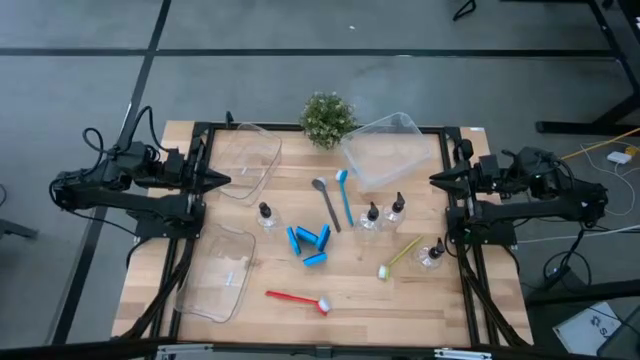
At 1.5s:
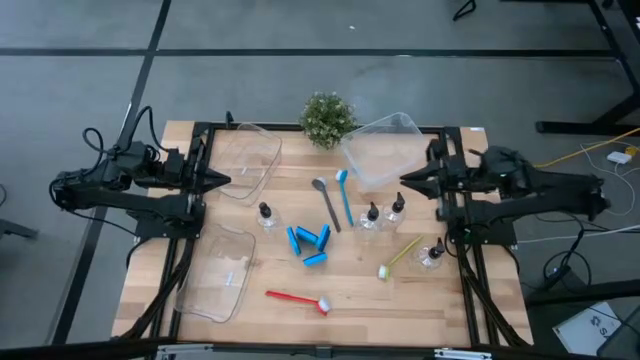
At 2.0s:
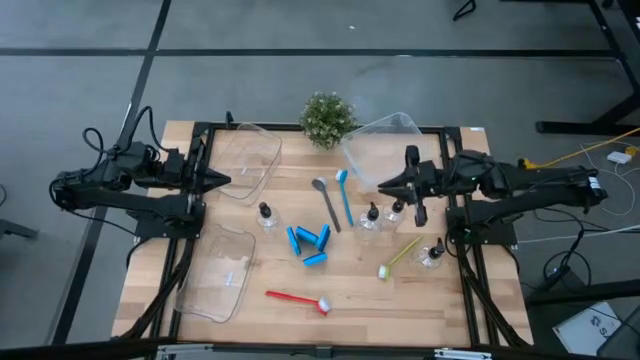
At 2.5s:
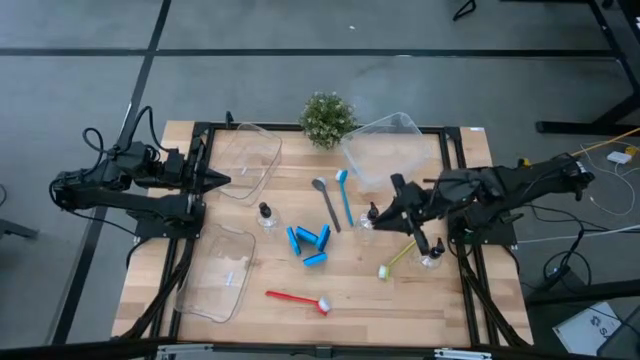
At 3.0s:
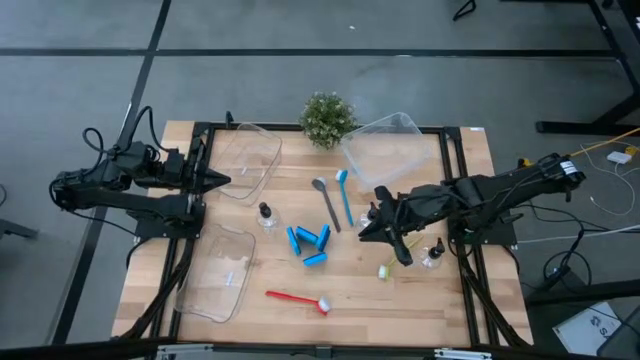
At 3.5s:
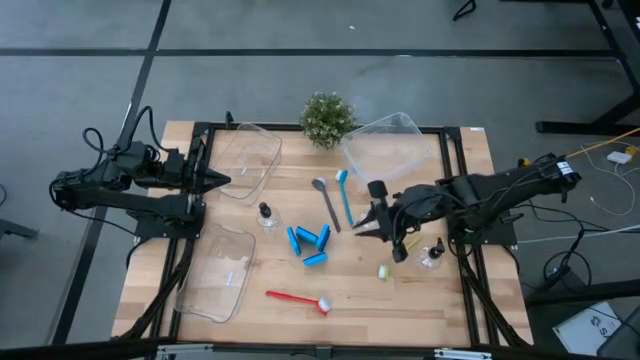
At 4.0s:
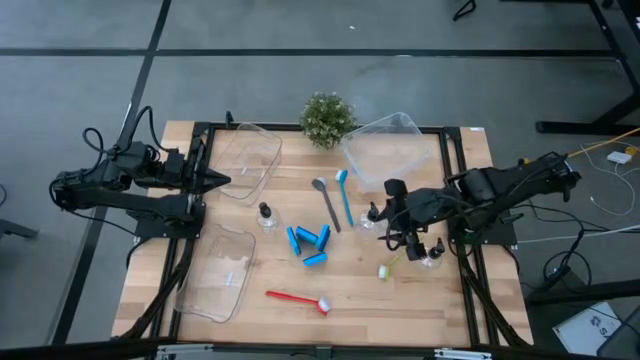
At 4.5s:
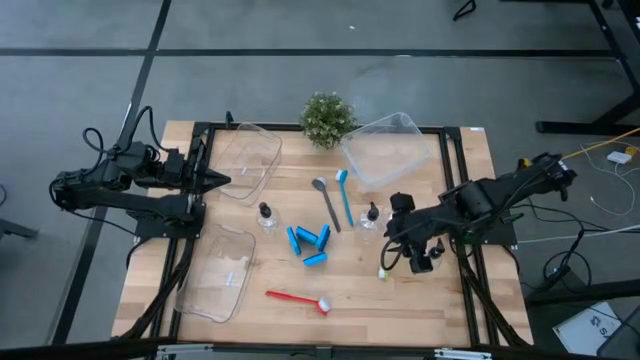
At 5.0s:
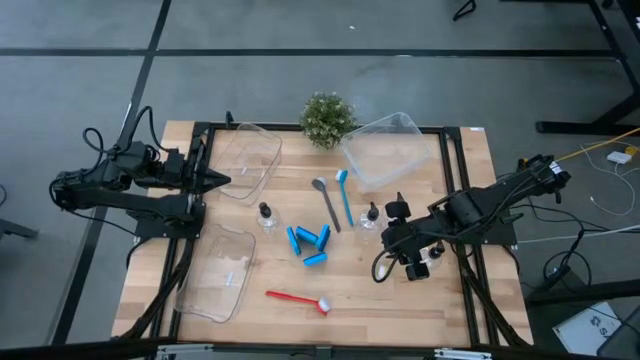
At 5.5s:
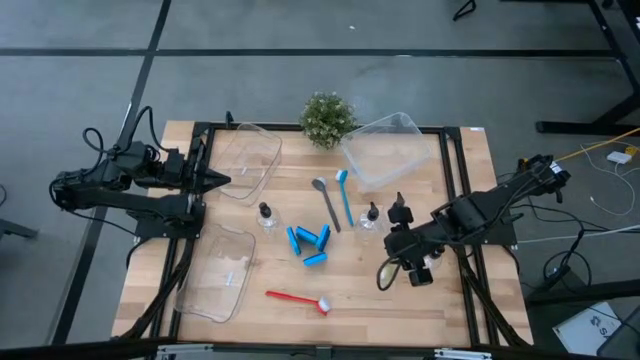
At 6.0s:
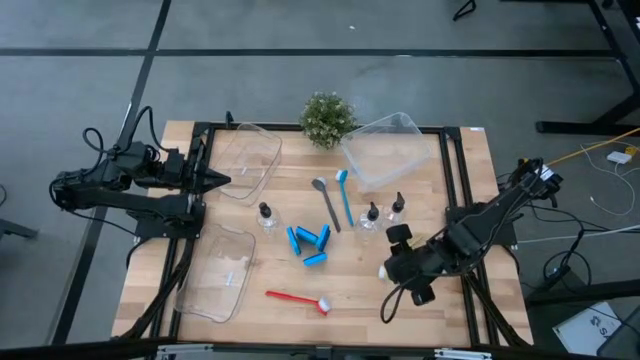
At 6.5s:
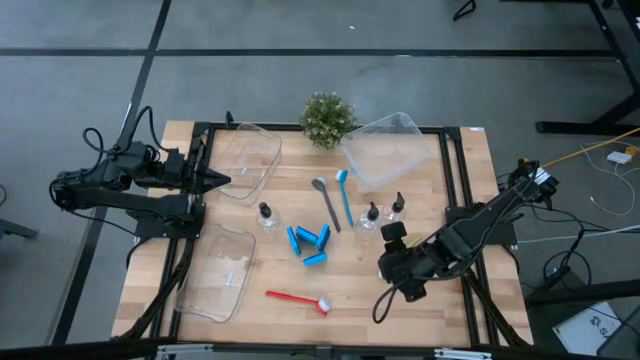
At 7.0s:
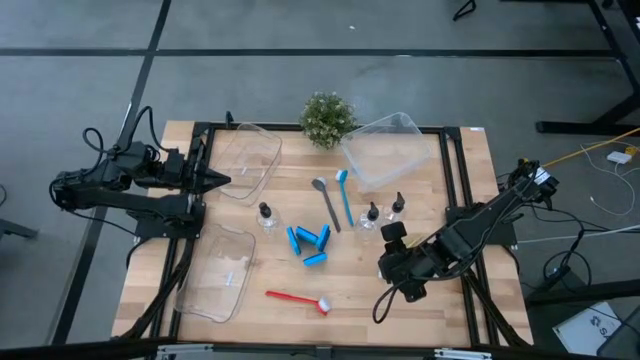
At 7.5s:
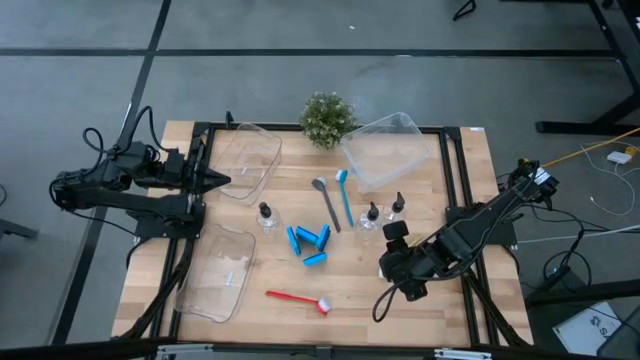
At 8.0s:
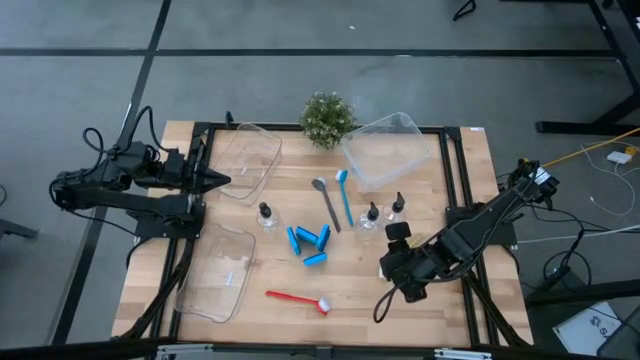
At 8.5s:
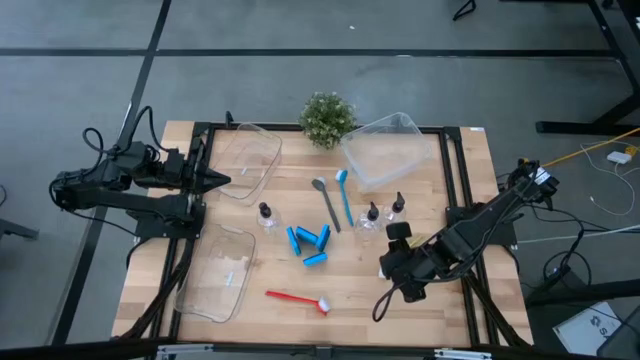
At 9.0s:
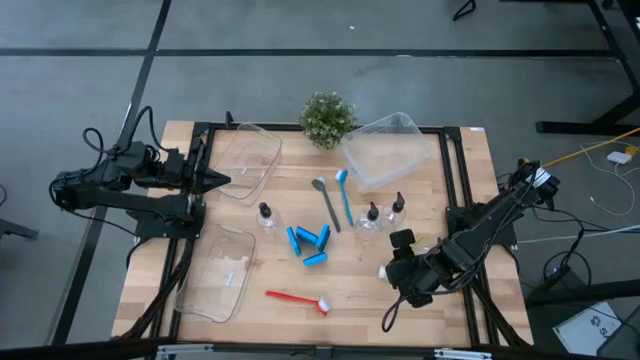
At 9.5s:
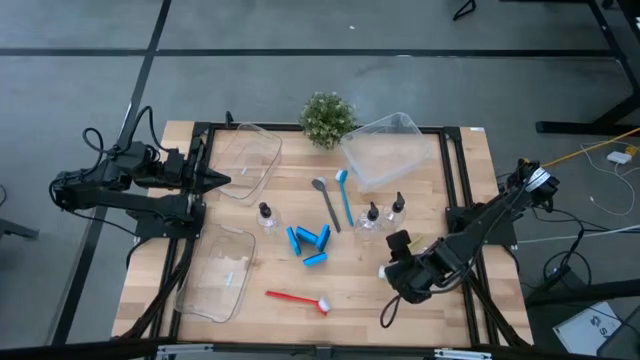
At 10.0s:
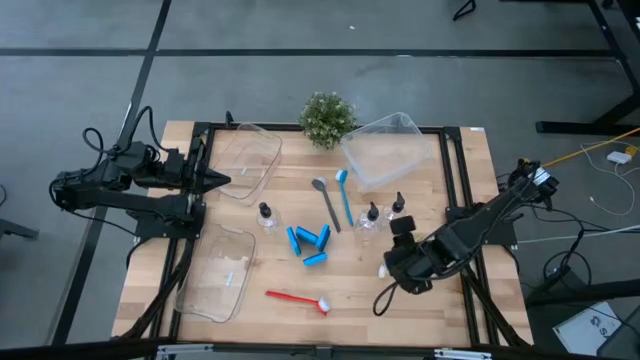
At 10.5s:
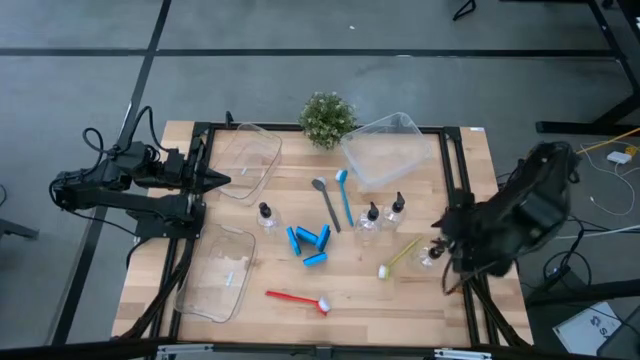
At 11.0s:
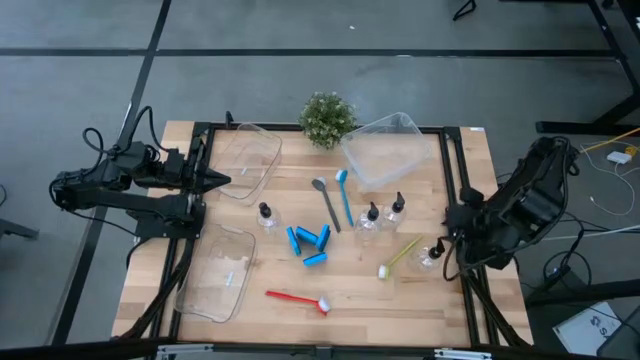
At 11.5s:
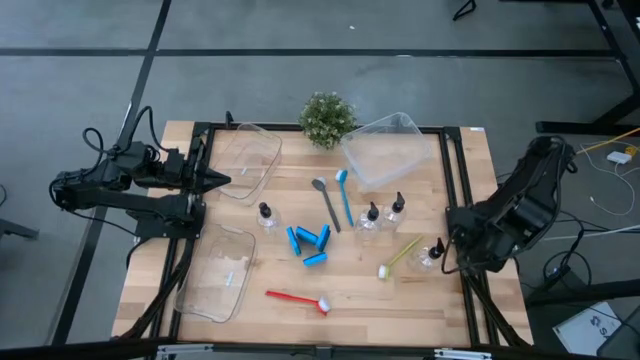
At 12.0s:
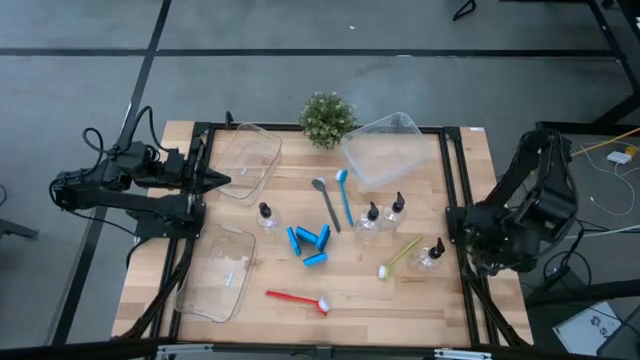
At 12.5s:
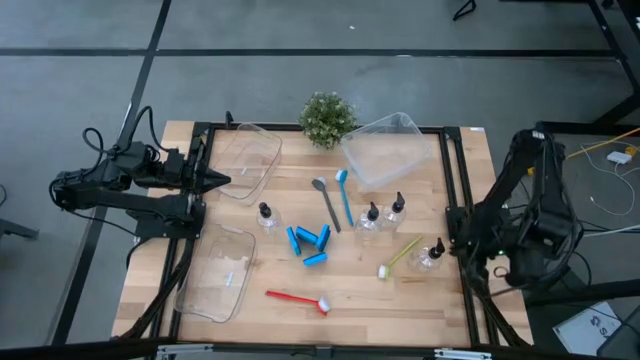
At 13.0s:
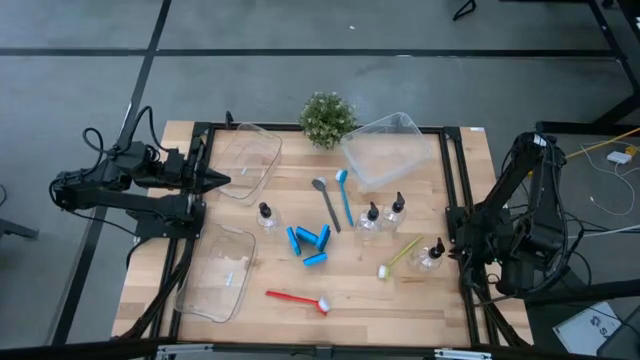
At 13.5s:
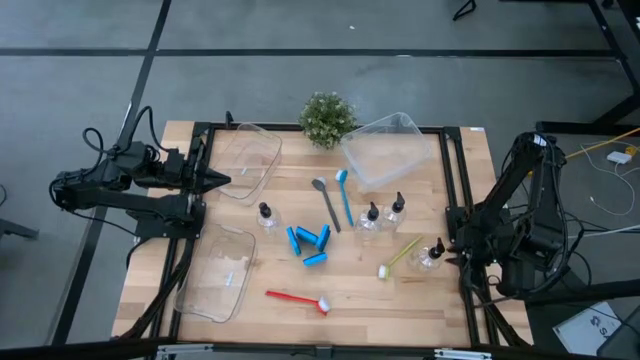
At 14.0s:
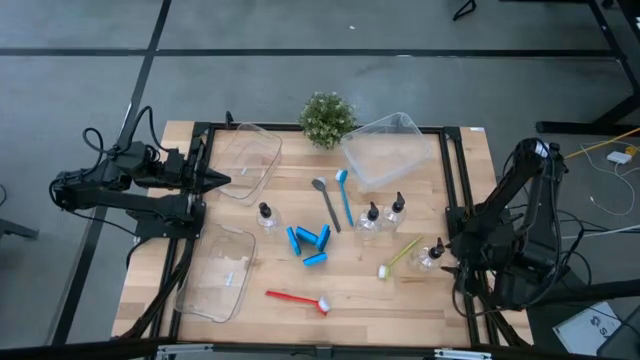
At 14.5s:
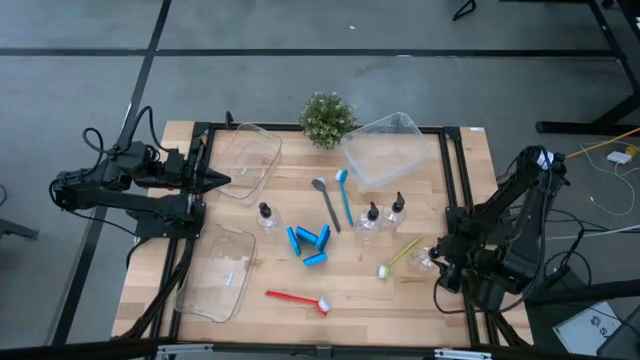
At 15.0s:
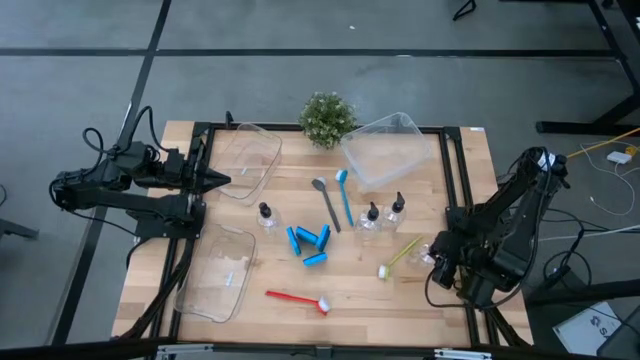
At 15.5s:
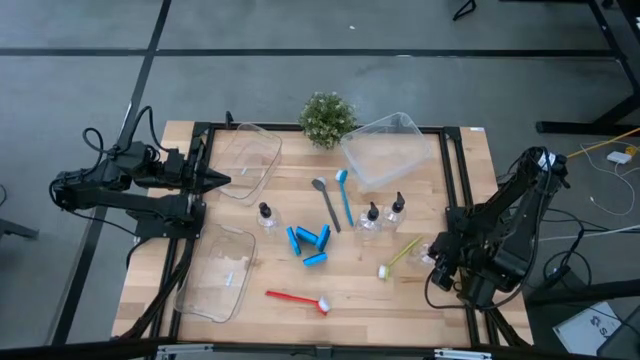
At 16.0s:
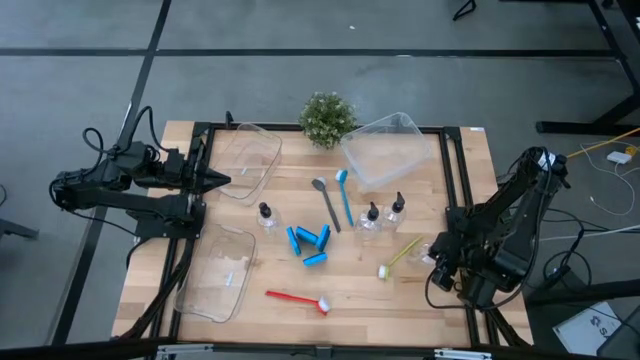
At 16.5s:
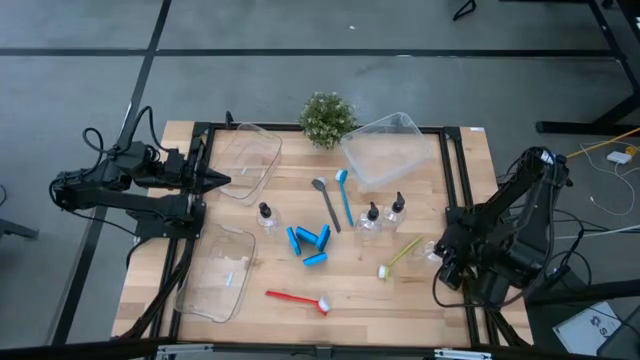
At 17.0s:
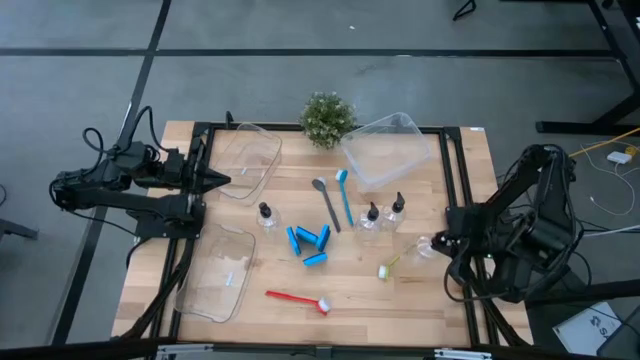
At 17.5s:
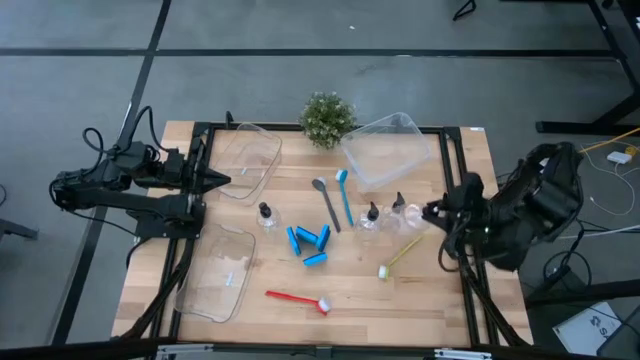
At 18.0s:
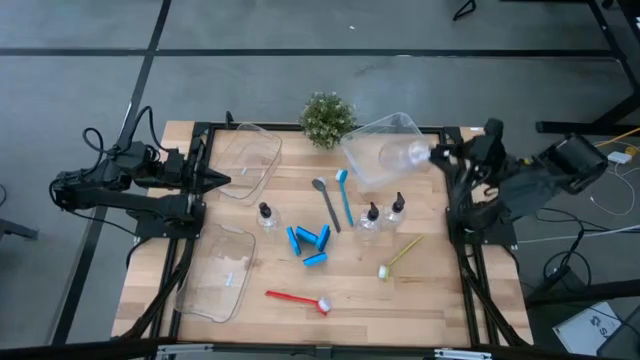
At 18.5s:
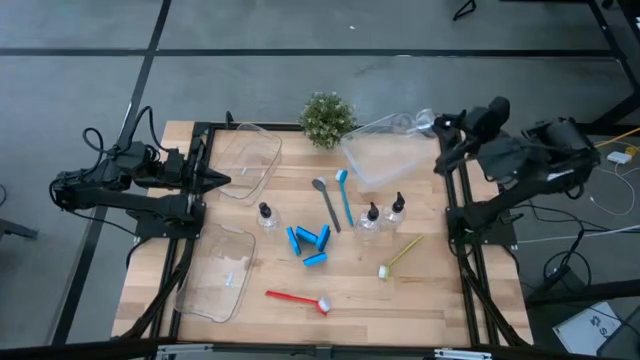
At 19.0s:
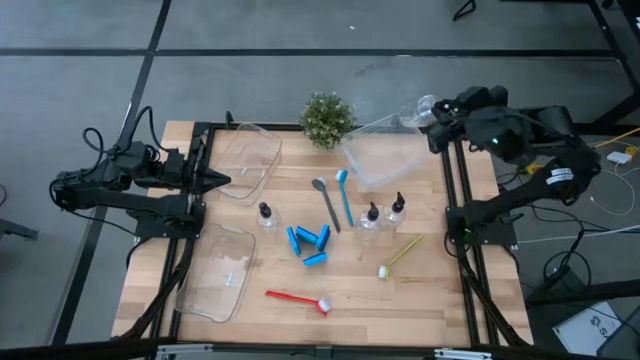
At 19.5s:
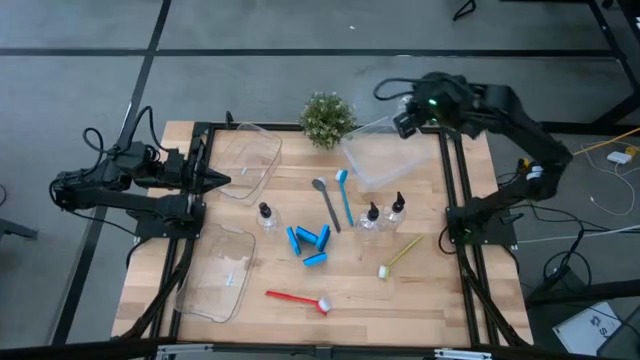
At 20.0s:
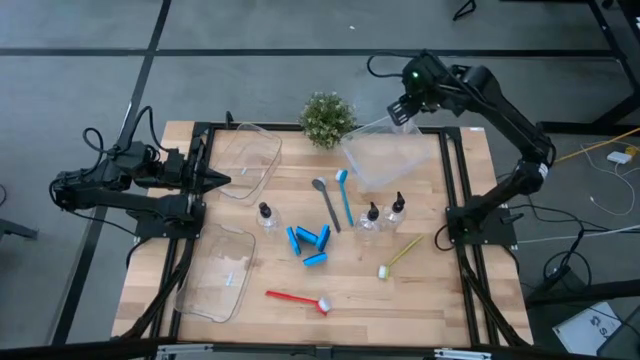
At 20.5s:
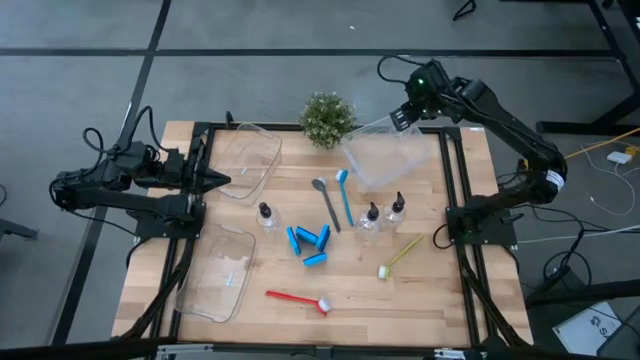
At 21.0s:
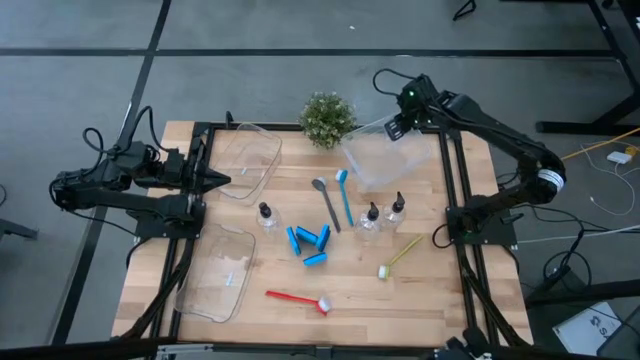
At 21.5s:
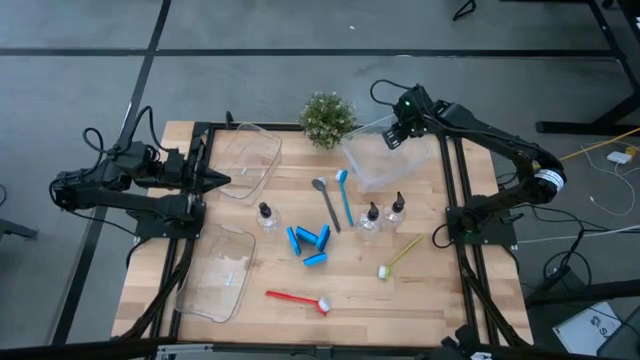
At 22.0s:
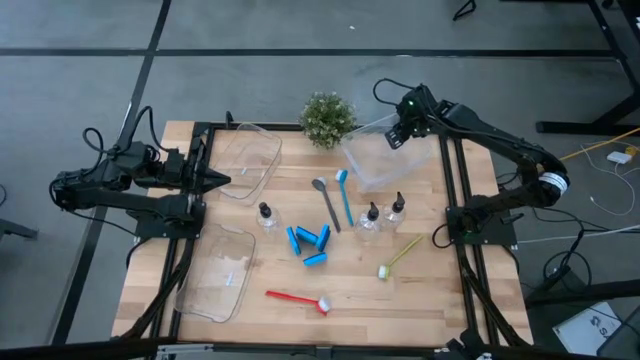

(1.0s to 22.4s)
Task: Pick & Place Kitchen Sink Supplies
Put the soap dispenser into the white bin
